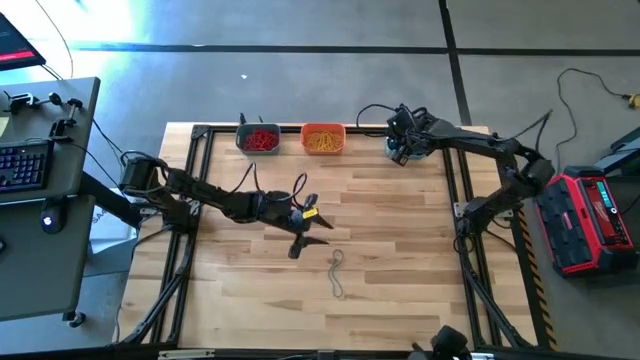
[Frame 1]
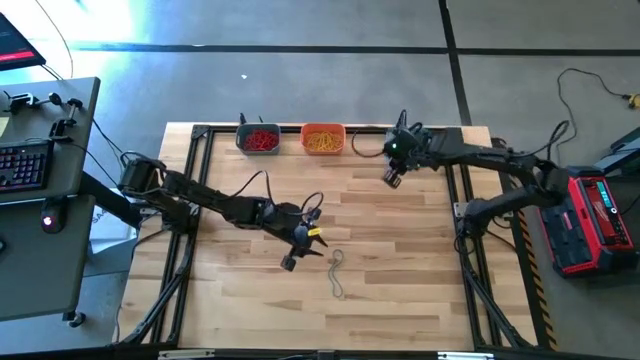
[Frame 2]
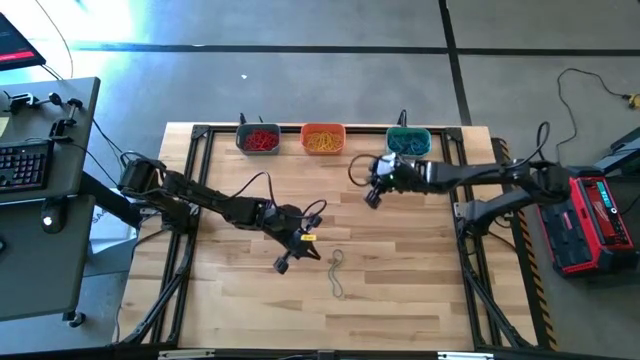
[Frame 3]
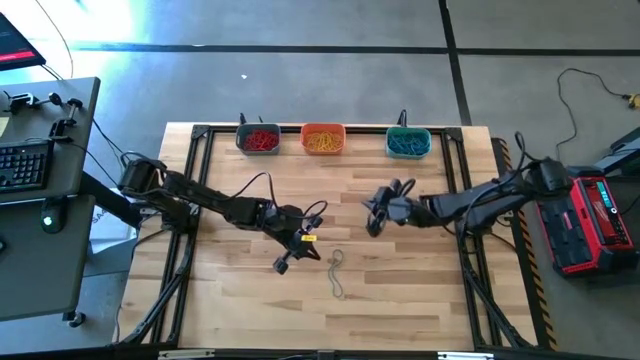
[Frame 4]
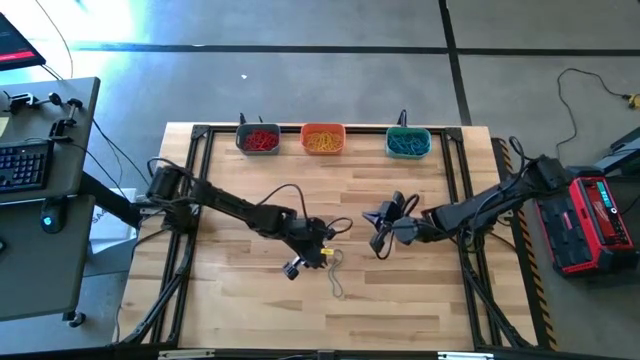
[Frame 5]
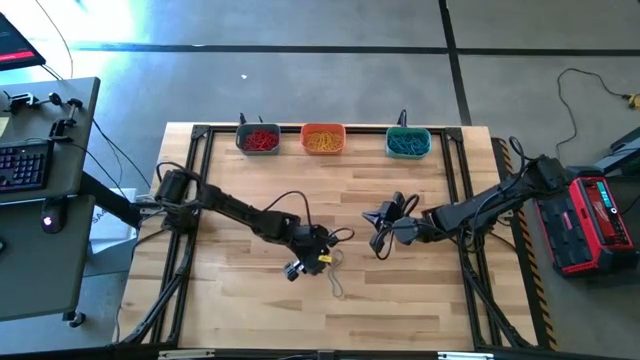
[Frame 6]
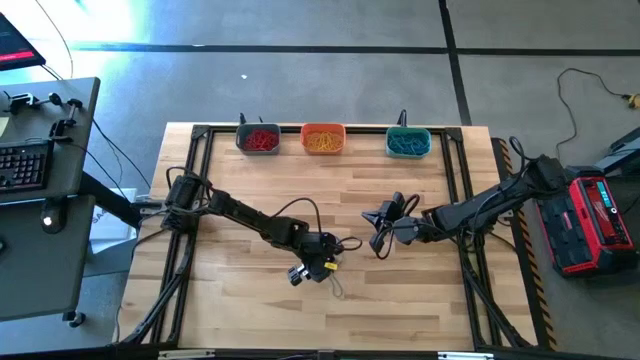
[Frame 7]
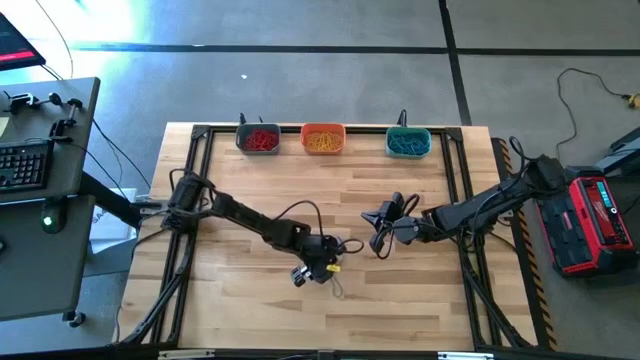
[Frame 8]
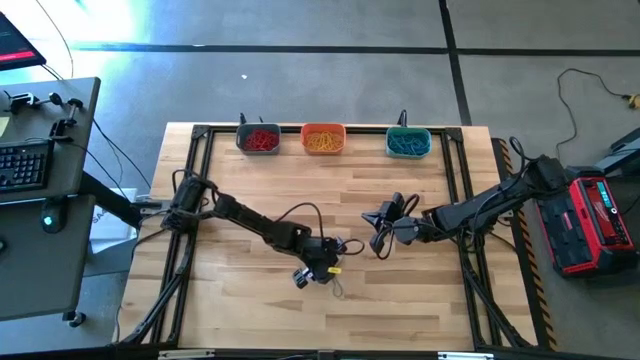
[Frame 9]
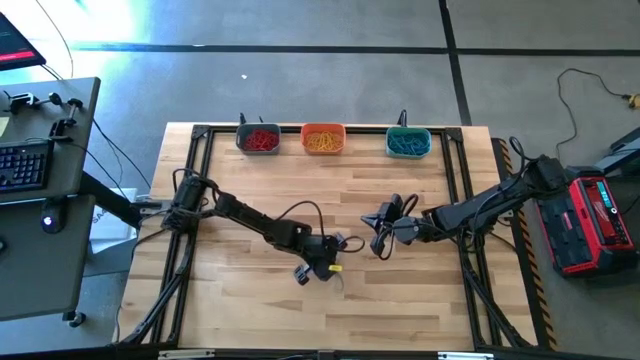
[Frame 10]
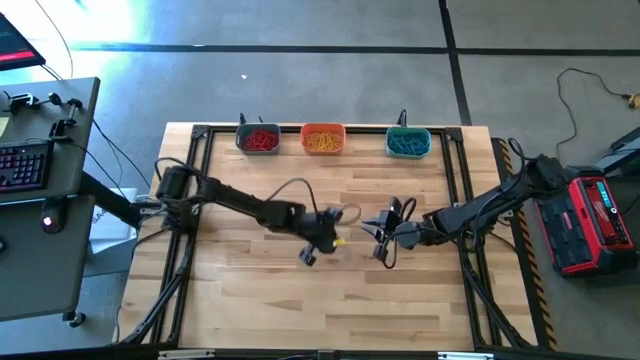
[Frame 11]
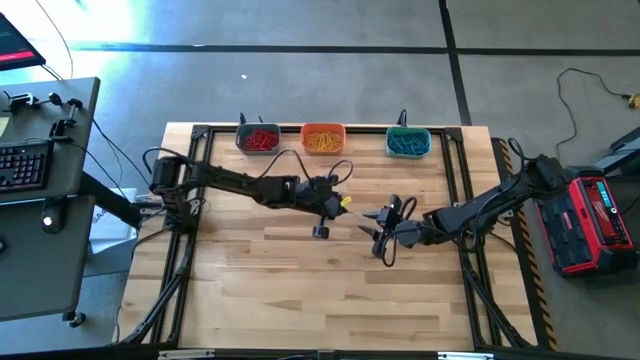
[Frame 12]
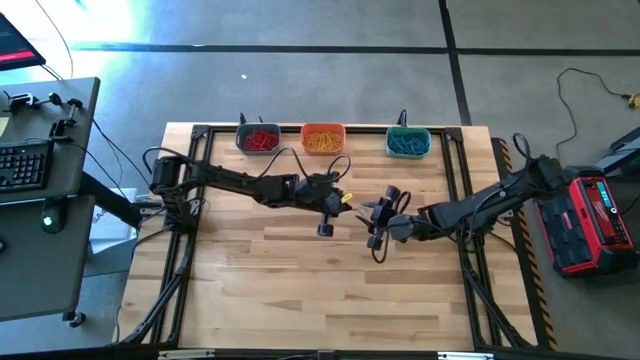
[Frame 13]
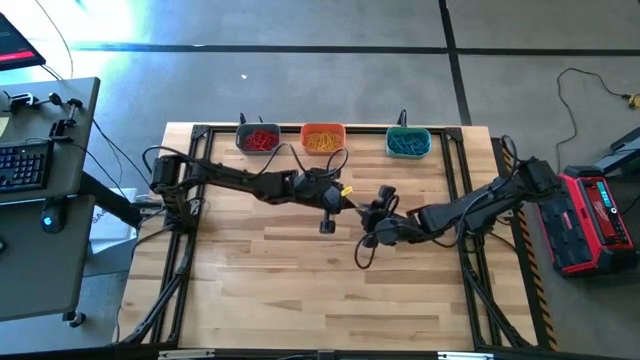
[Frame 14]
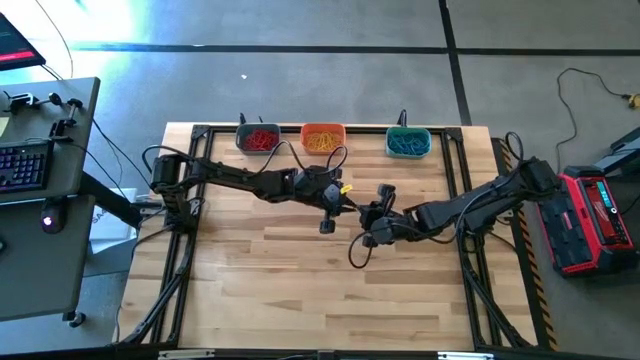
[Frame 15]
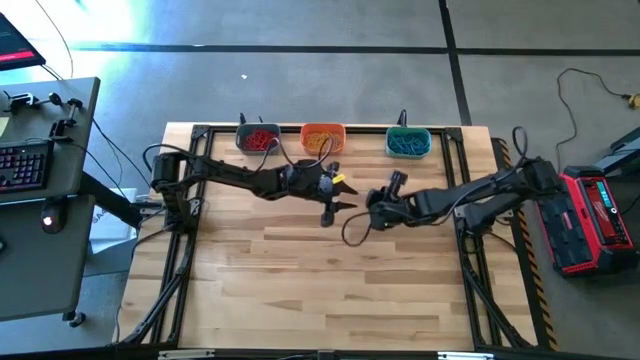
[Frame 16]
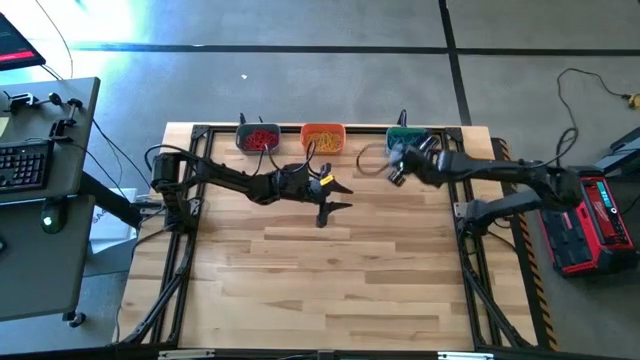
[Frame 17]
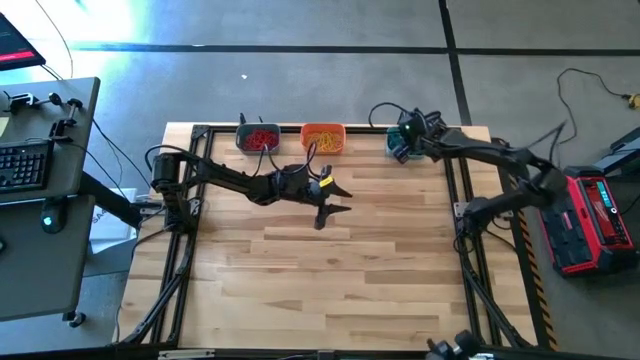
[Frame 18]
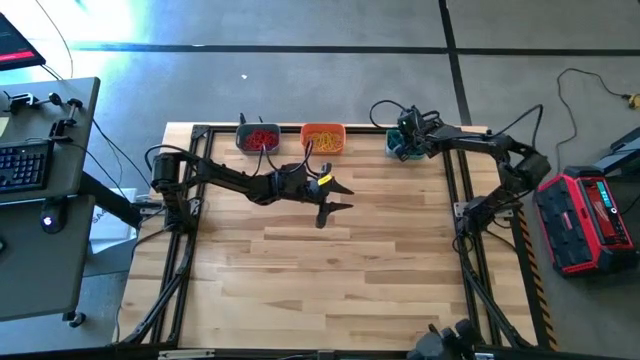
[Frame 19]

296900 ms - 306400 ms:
Task: Sort rubber bands into baskets
Put the blue rubber band into the light blue bin

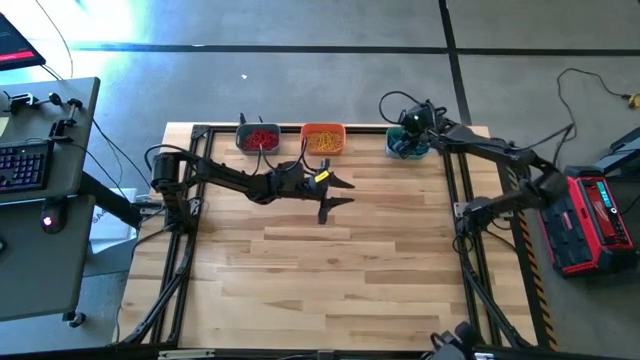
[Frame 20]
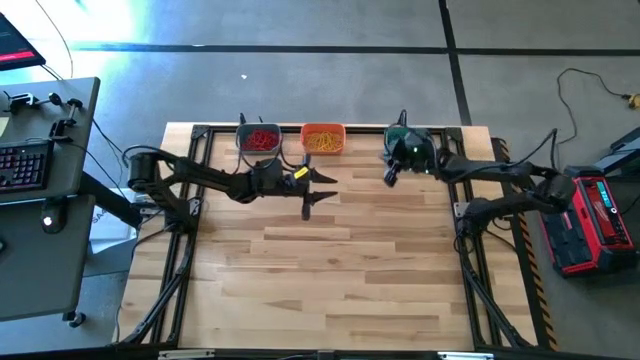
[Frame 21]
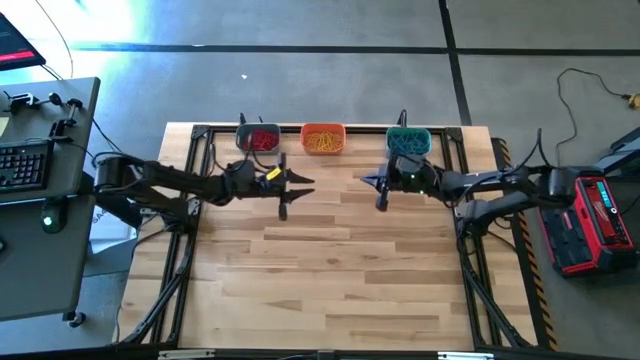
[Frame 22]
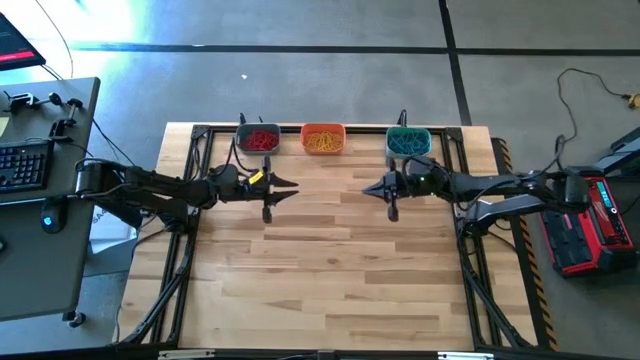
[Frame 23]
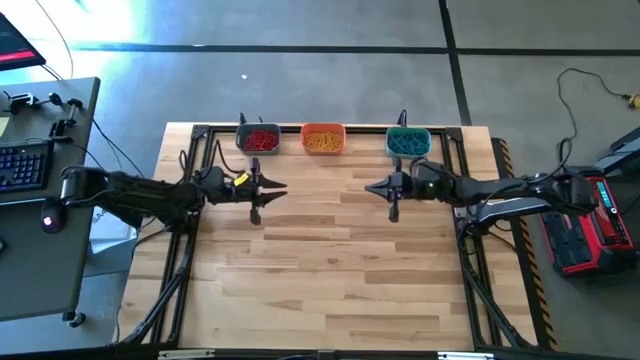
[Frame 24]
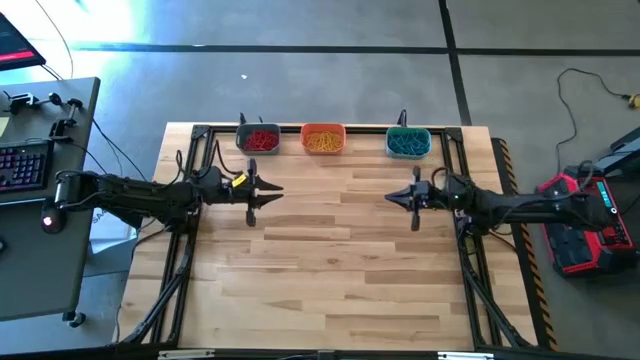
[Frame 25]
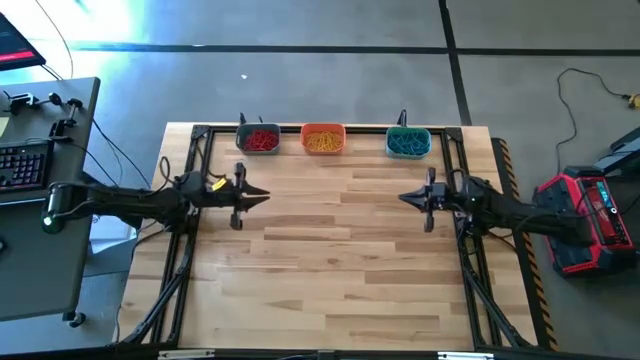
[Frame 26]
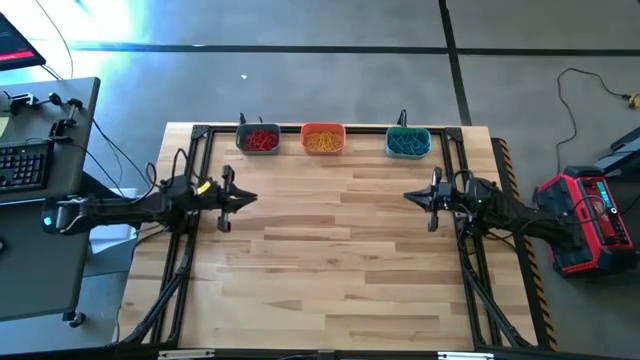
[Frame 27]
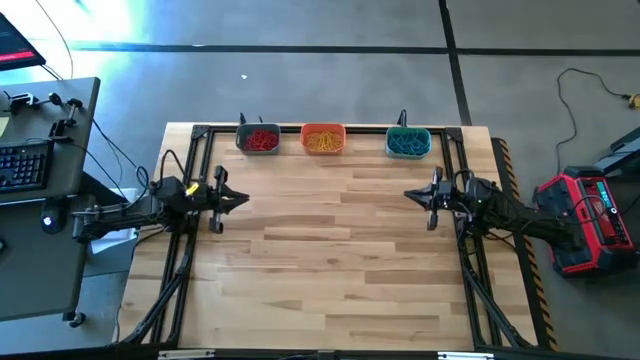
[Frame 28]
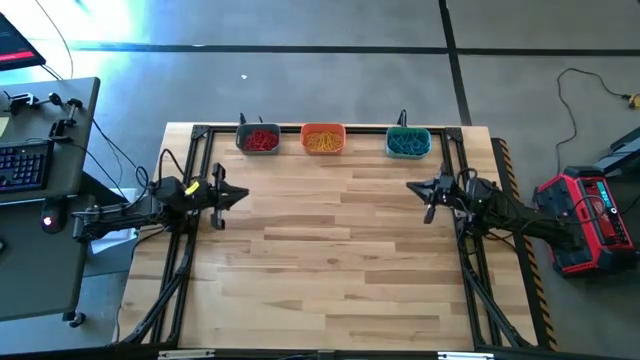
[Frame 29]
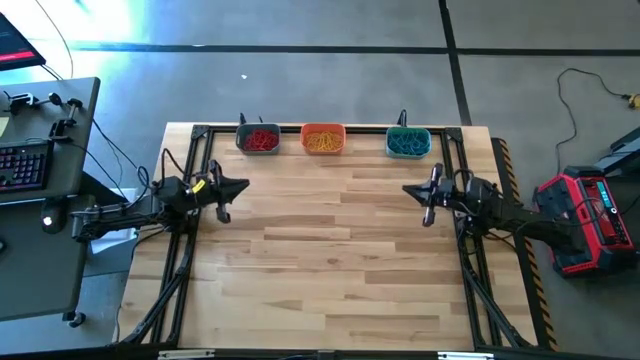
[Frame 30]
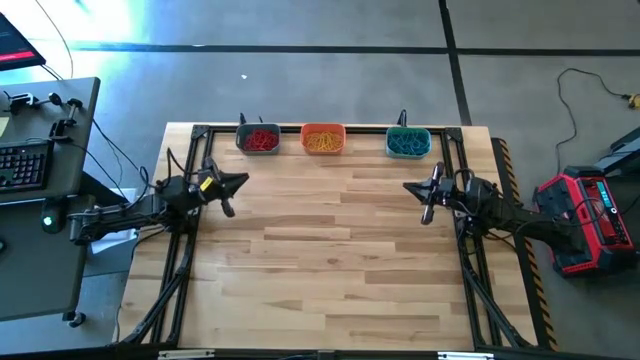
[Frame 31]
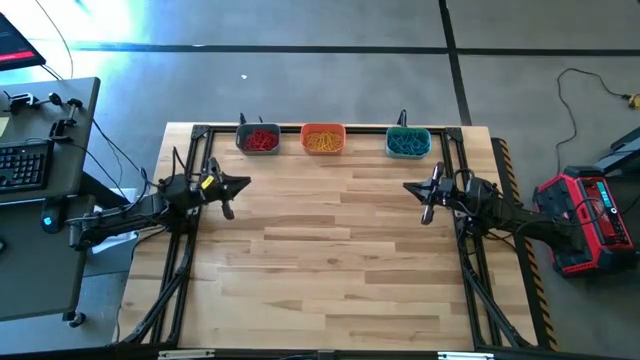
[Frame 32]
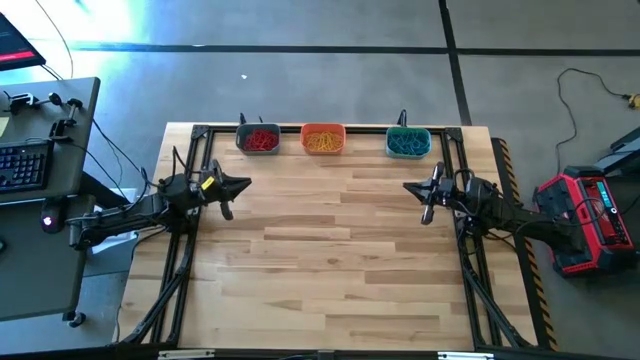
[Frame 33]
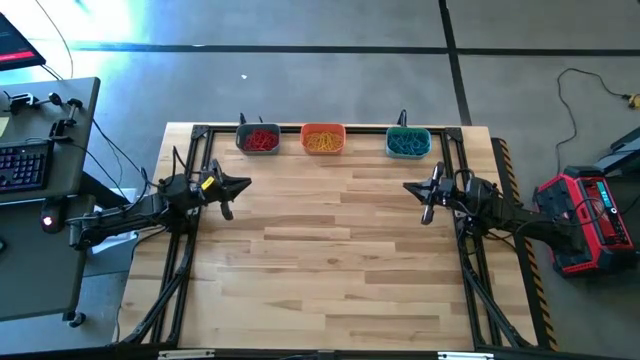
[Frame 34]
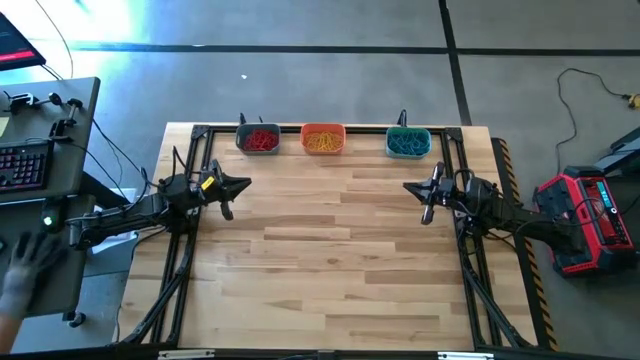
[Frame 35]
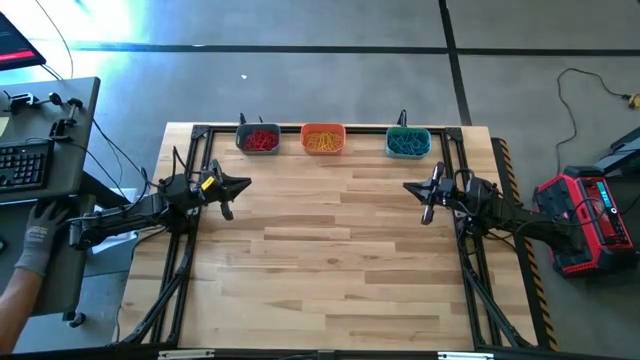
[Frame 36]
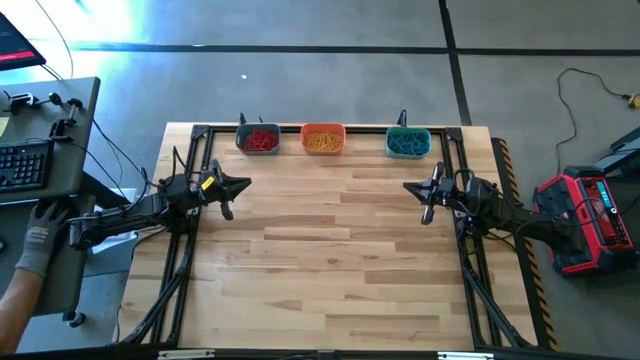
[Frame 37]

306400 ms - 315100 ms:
Return to Home Position

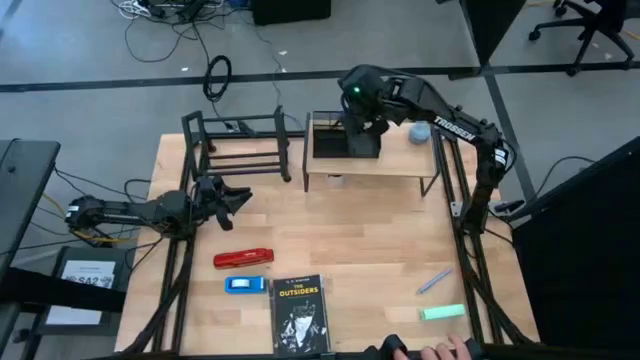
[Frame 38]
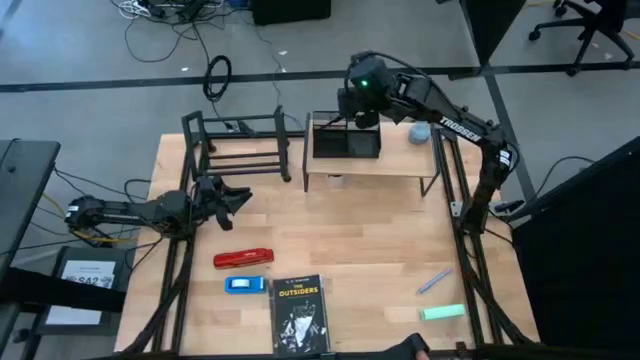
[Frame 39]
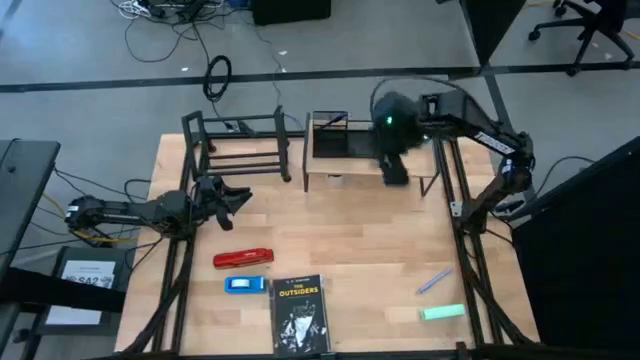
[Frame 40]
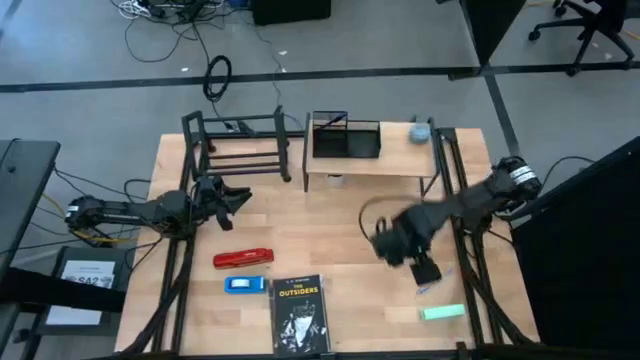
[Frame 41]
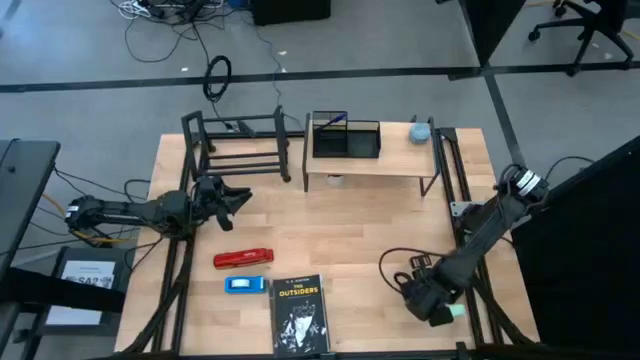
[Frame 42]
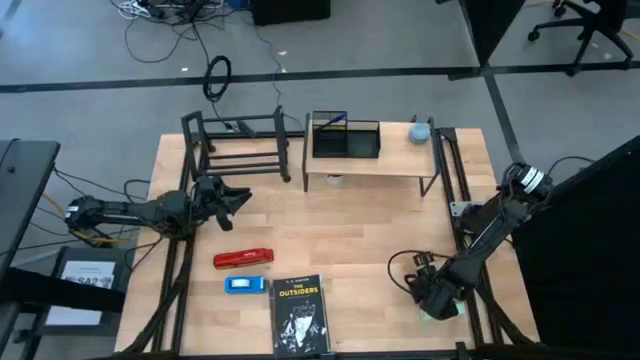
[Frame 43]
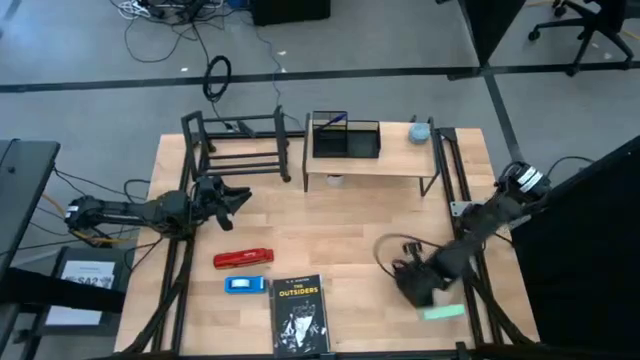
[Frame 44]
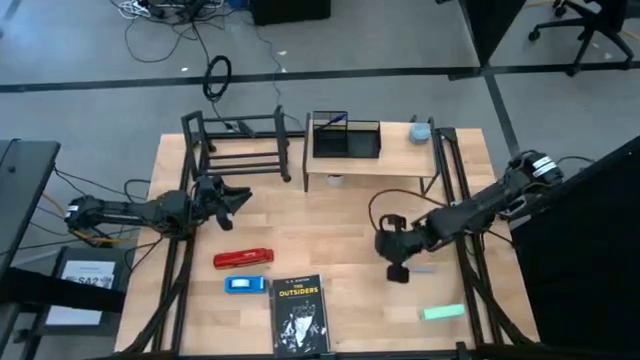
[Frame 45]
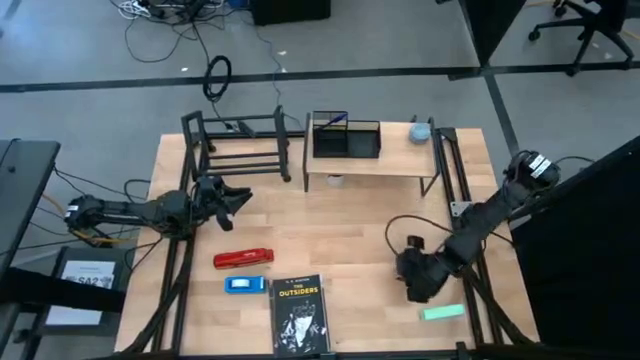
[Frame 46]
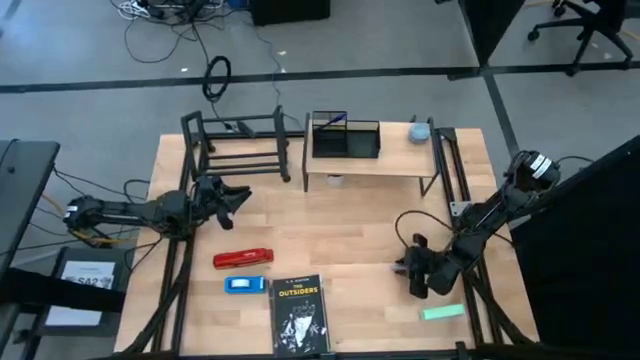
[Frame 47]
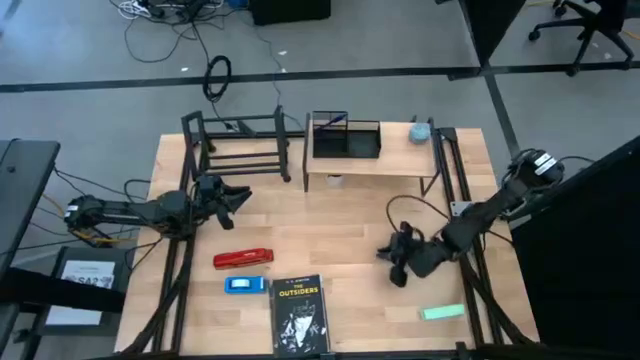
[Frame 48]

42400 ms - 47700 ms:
Task: Stock shelves
Put the violet pen into the pen holder of the black desk organizer
